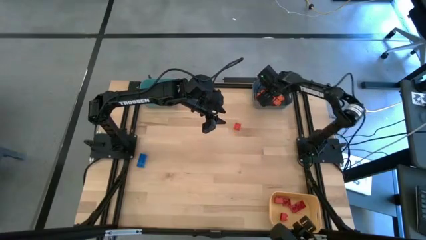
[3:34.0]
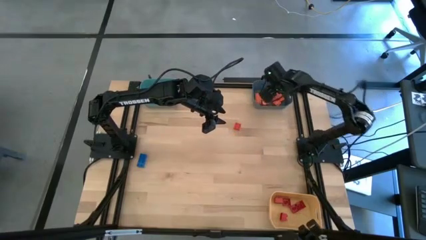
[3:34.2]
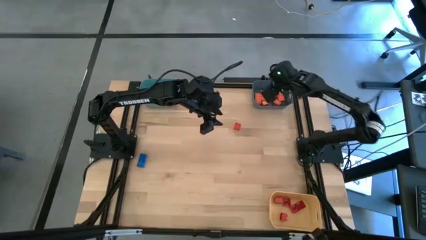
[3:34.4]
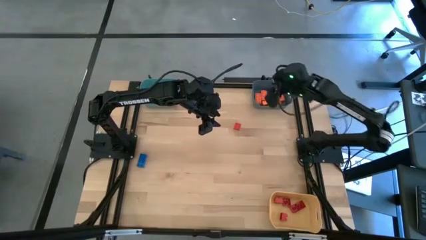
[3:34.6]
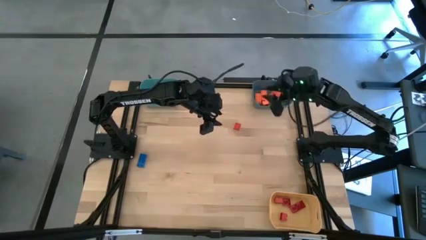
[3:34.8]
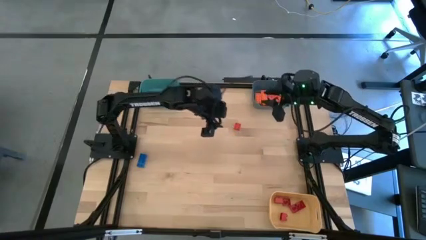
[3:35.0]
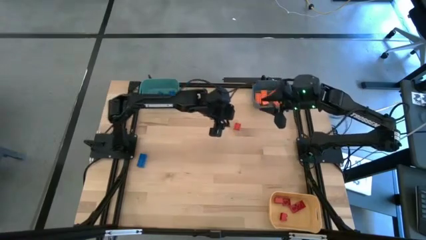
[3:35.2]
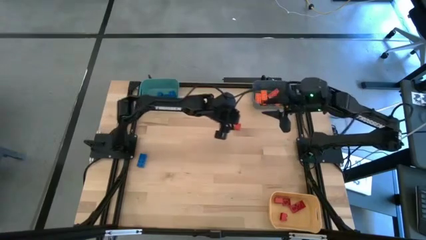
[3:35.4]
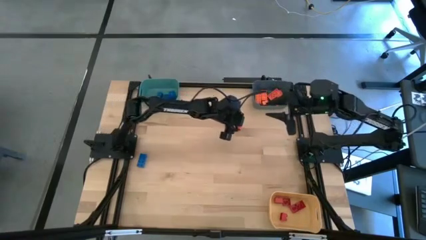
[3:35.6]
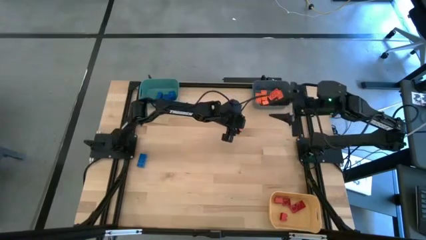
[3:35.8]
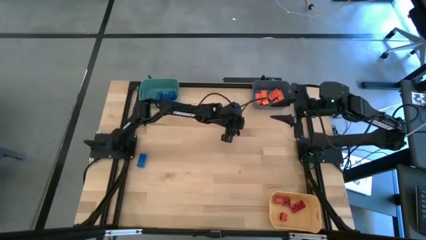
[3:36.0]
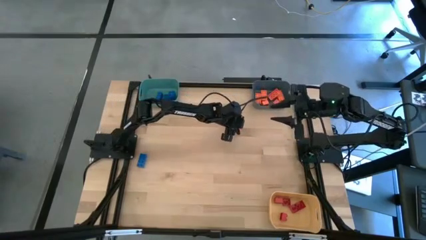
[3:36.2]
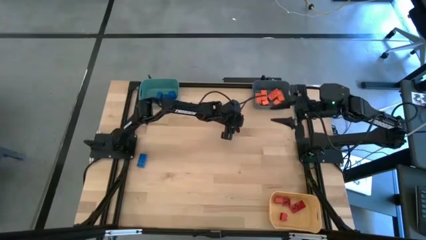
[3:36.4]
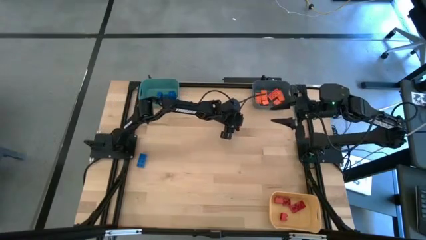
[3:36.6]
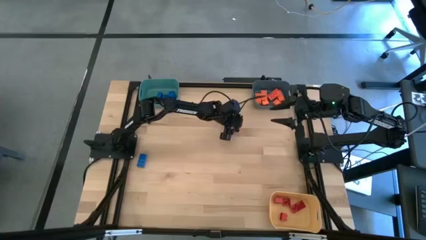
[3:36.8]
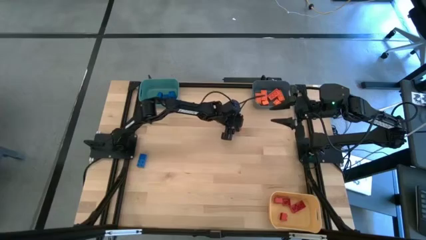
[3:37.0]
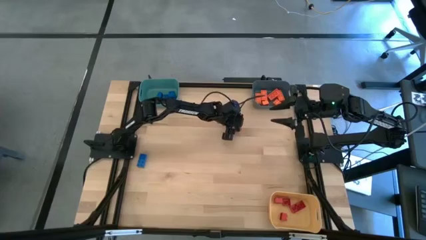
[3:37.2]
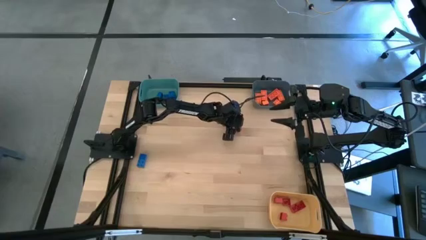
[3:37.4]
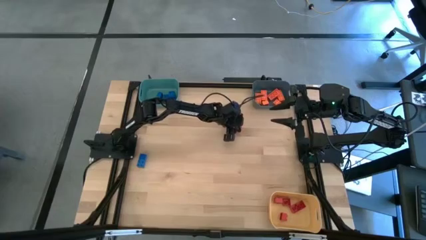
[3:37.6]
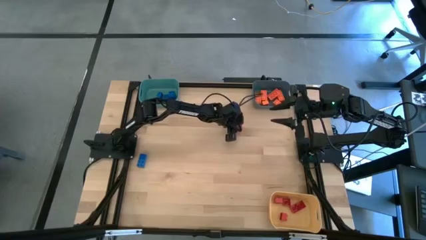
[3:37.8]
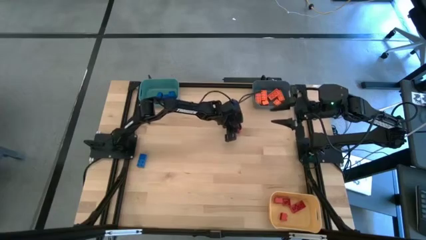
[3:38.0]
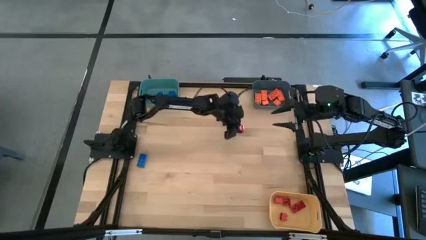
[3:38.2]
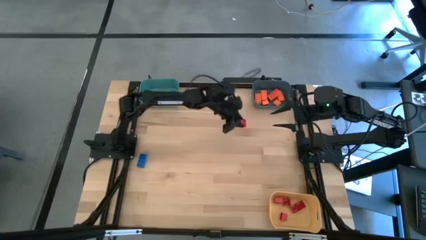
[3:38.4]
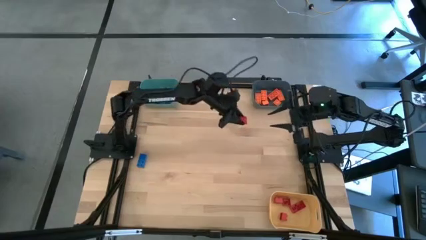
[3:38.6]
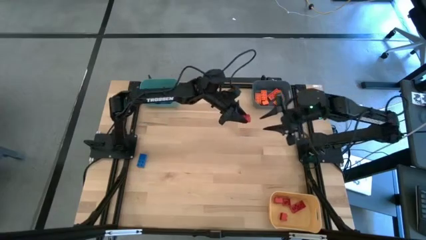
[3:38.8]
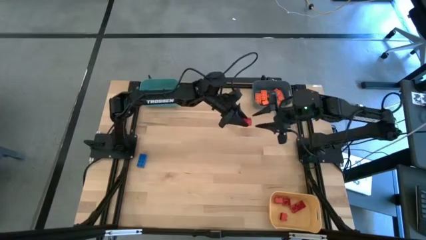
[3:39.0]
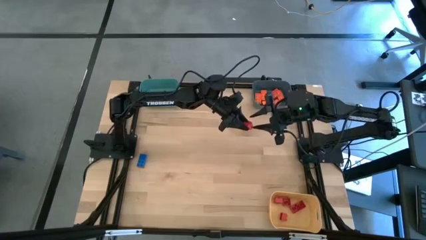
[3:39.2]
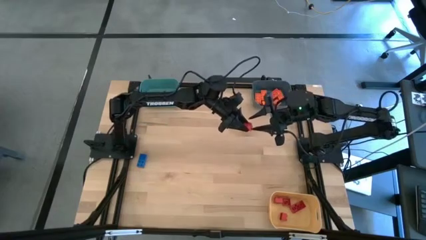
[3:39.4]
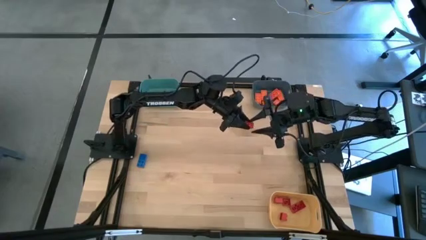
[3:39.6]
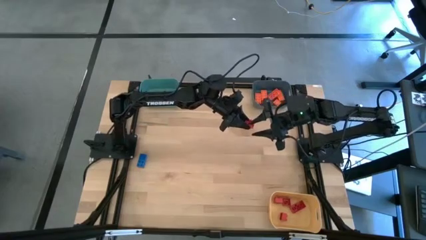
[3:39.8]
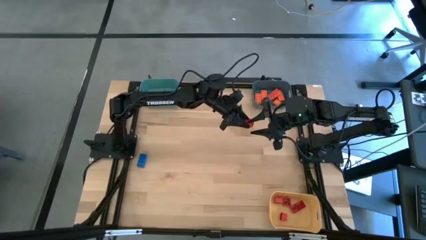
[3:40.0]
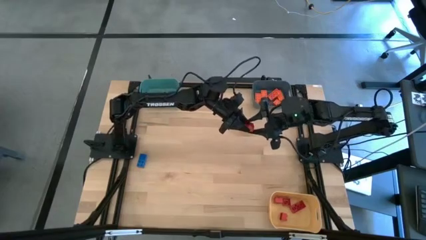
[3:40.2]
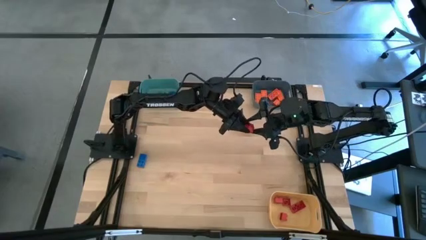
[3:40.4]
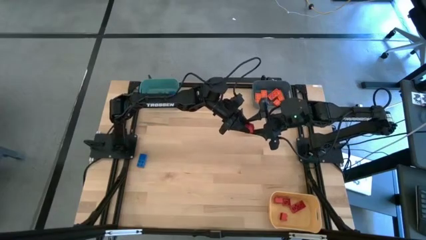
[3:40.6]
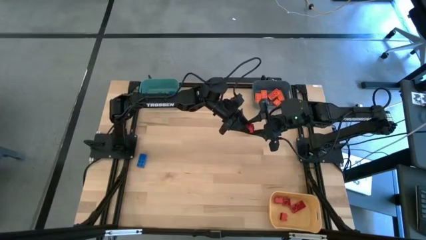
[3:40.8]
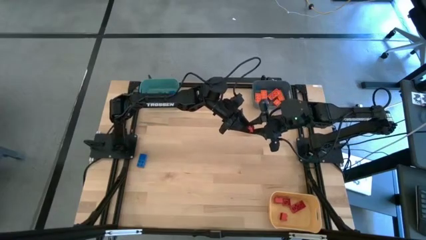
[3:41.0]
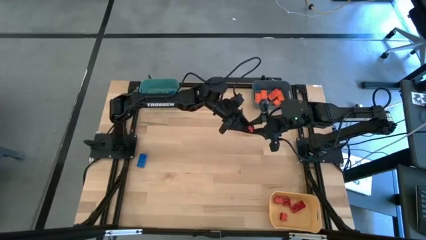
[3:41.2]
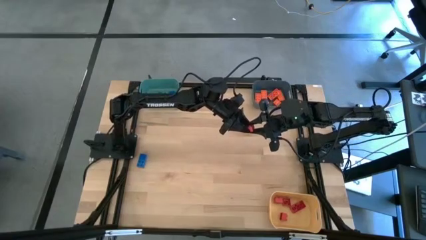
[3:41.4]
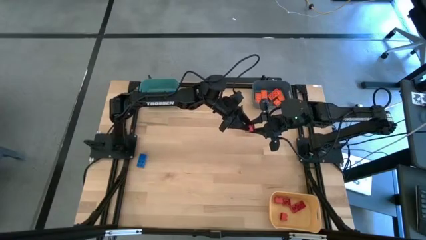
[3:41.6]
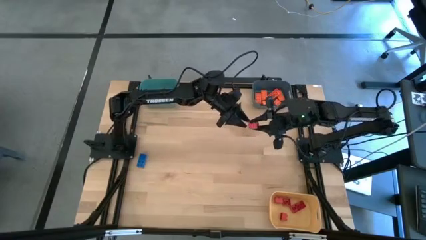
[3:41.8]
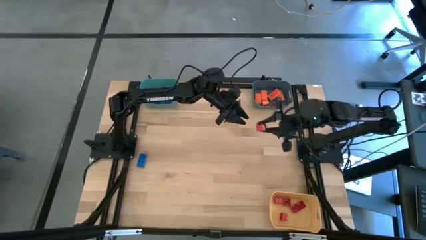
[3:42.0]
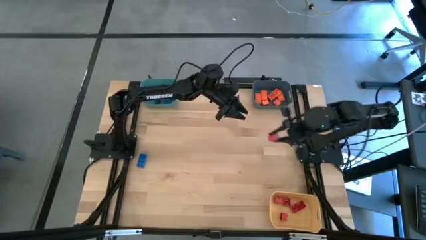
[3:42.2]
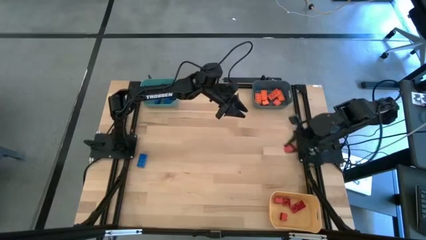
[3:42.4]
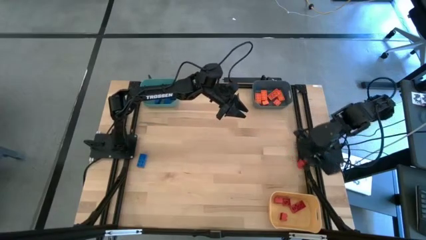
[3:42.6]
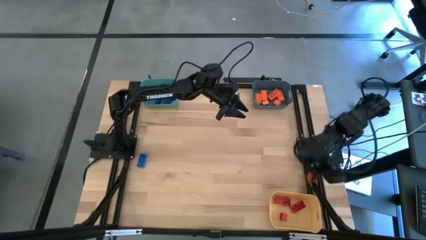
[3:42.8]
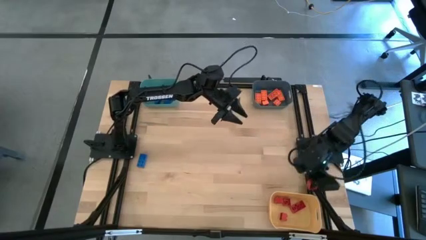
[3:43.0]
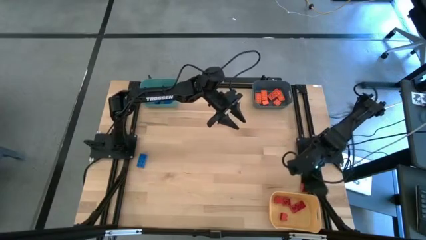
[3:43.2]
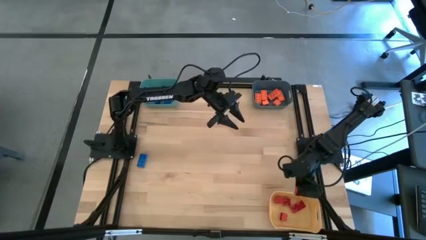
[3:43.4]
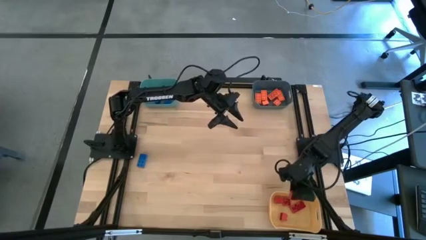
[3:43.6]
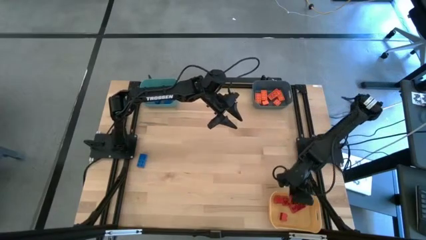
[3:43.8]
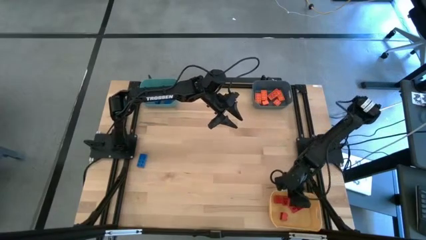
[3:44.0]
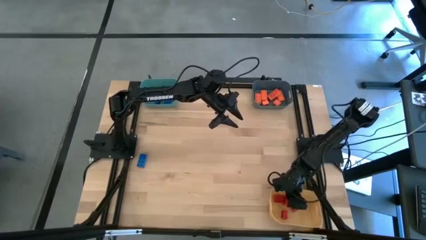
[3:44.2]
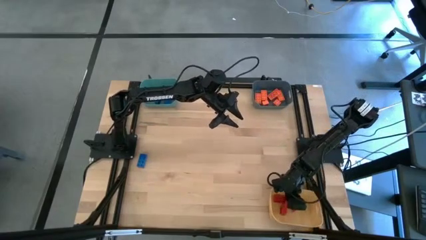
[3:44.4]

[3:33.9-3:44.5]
Task: Sort & place blocks by color
Put the red game piece into the yellow bin
